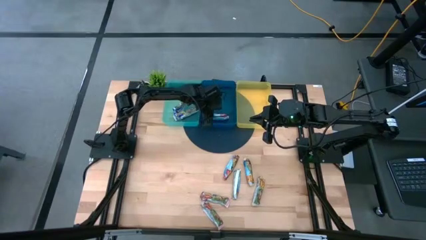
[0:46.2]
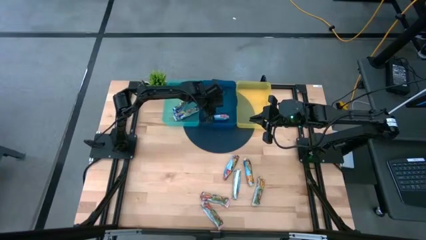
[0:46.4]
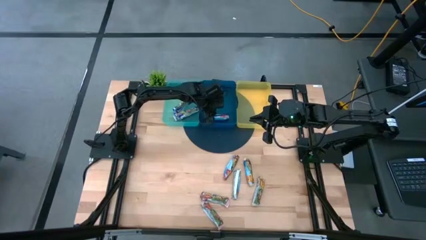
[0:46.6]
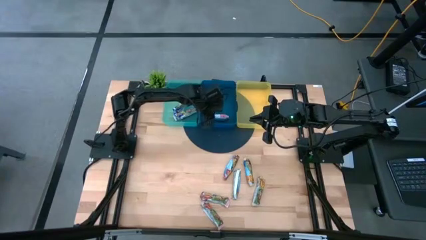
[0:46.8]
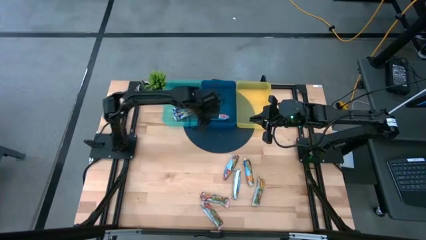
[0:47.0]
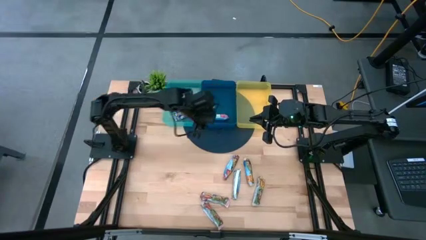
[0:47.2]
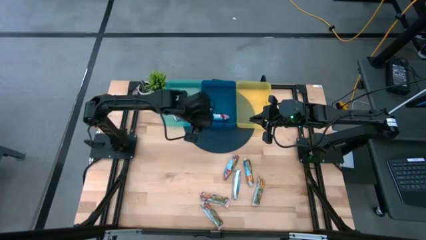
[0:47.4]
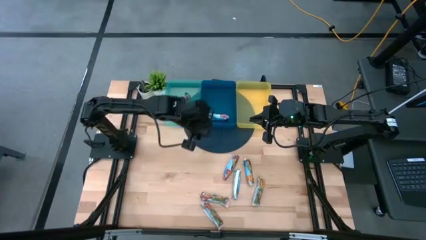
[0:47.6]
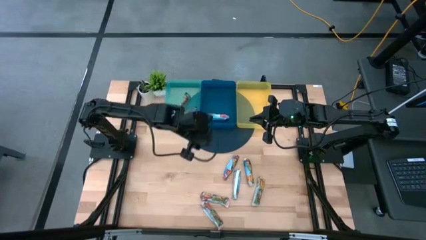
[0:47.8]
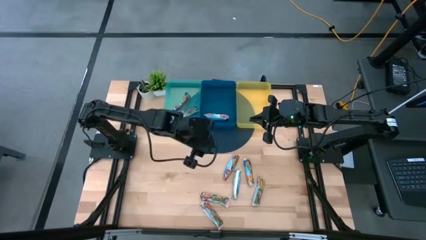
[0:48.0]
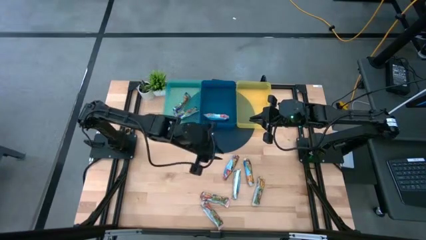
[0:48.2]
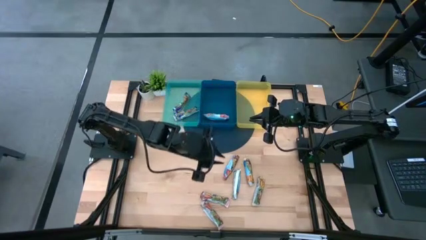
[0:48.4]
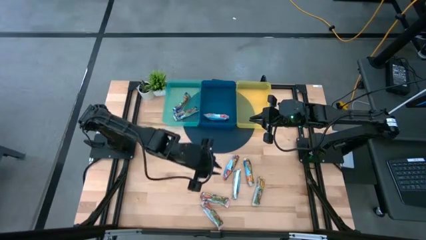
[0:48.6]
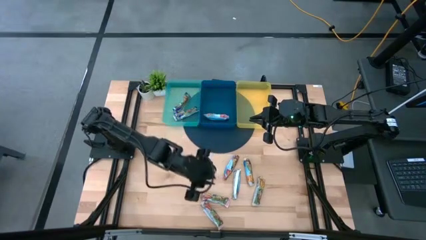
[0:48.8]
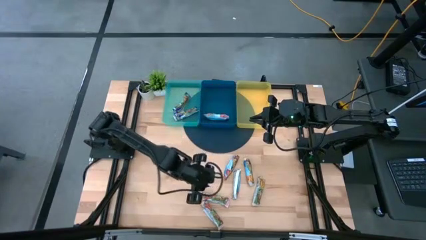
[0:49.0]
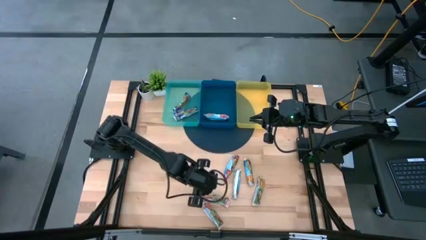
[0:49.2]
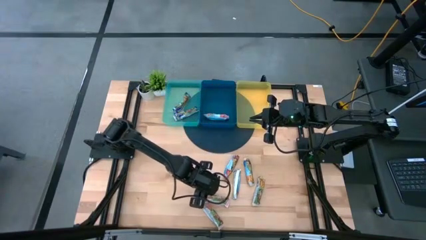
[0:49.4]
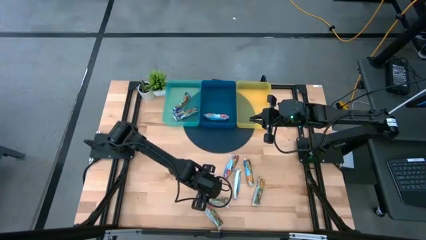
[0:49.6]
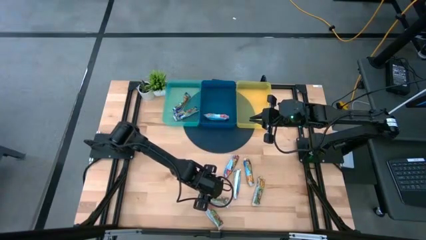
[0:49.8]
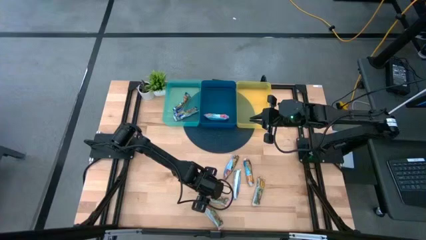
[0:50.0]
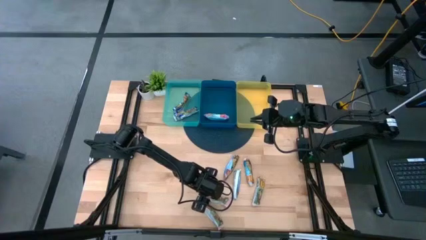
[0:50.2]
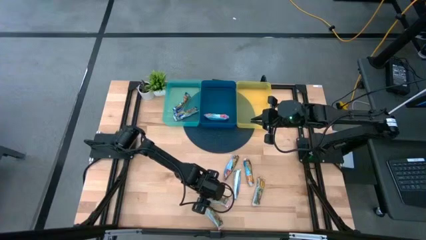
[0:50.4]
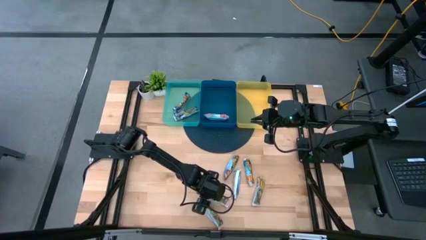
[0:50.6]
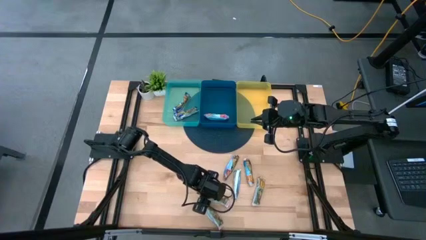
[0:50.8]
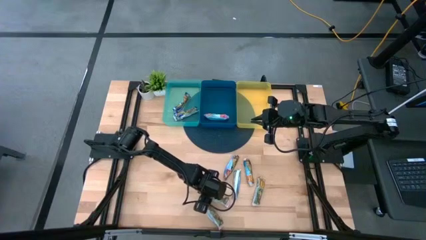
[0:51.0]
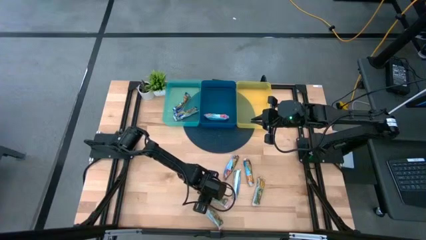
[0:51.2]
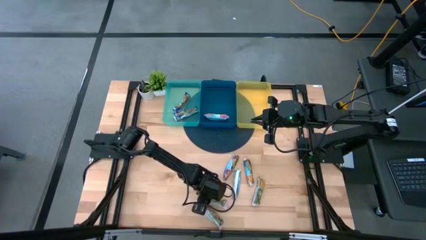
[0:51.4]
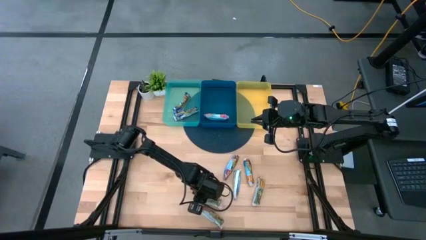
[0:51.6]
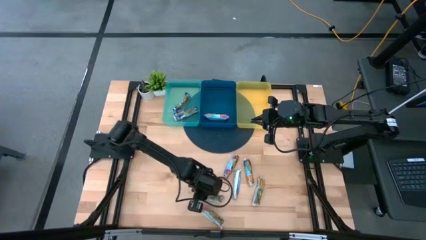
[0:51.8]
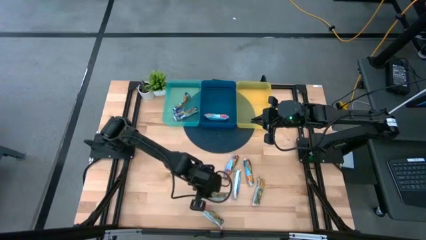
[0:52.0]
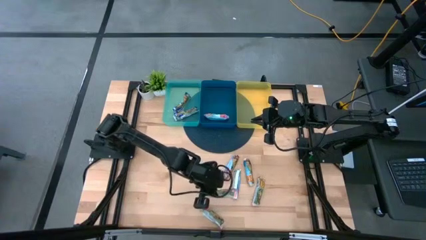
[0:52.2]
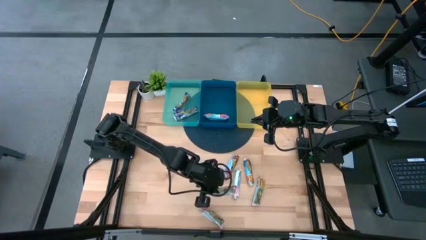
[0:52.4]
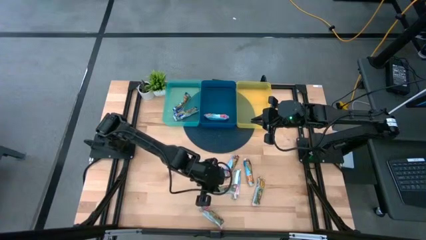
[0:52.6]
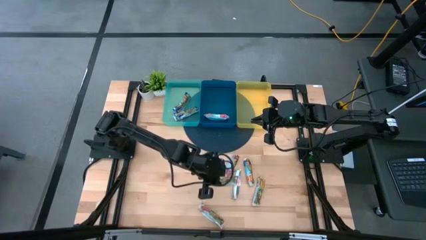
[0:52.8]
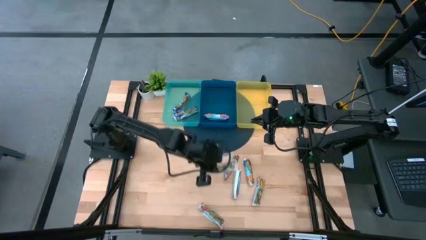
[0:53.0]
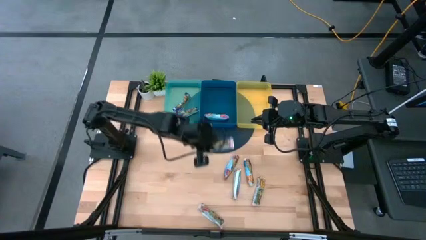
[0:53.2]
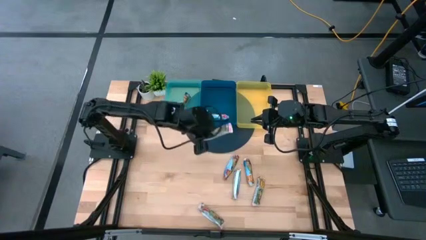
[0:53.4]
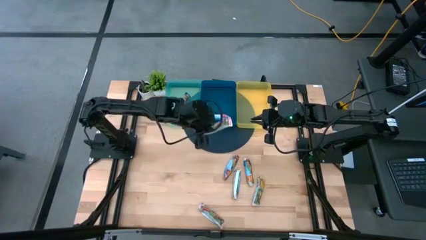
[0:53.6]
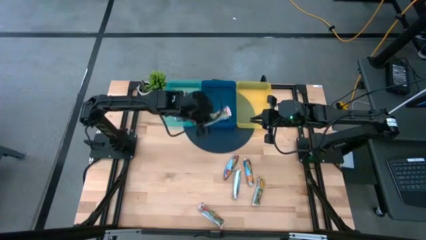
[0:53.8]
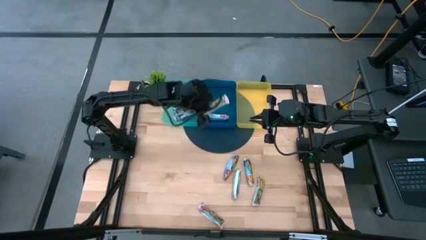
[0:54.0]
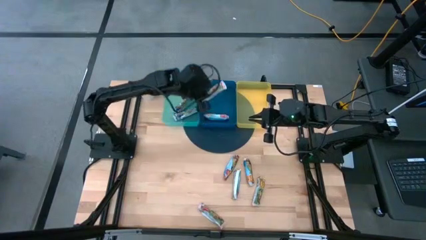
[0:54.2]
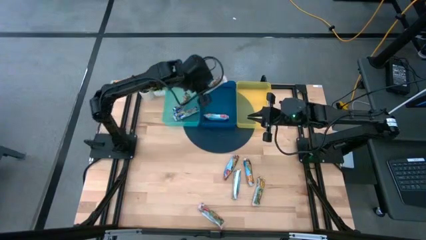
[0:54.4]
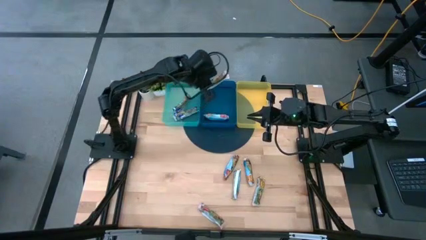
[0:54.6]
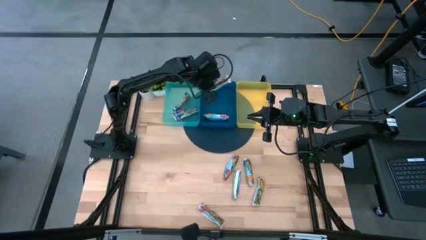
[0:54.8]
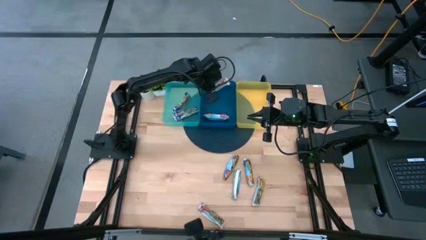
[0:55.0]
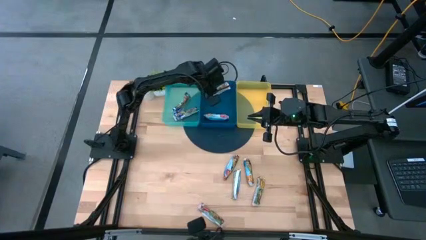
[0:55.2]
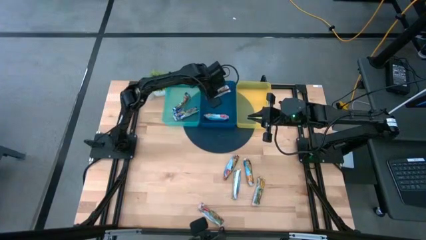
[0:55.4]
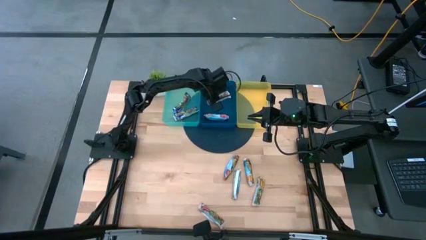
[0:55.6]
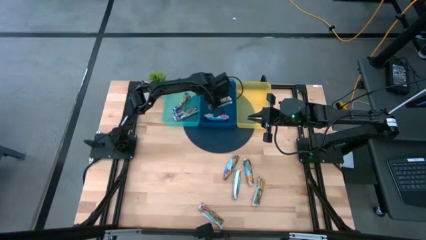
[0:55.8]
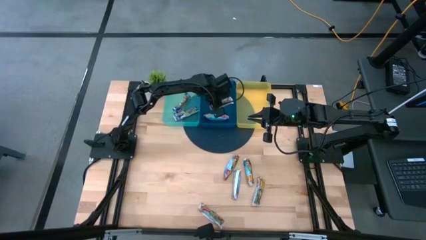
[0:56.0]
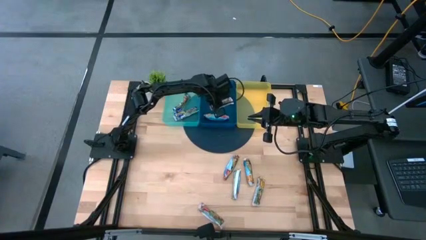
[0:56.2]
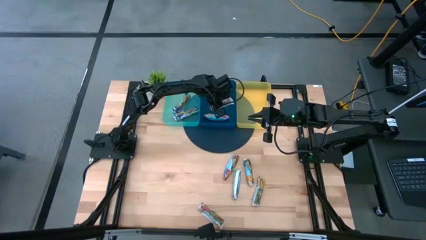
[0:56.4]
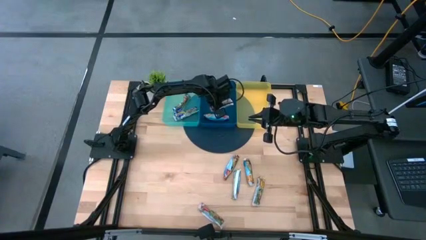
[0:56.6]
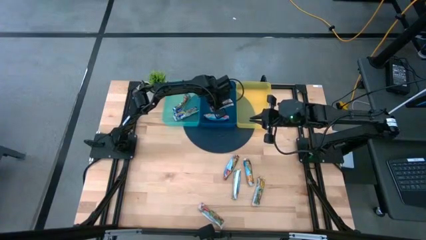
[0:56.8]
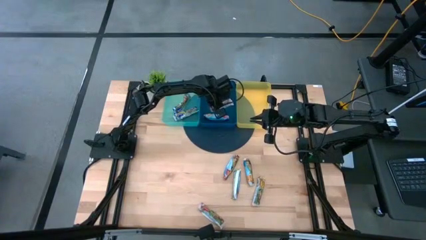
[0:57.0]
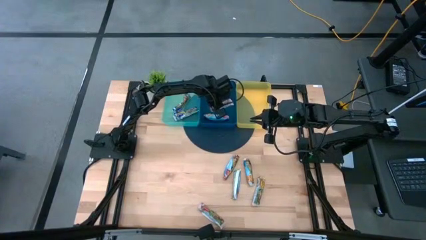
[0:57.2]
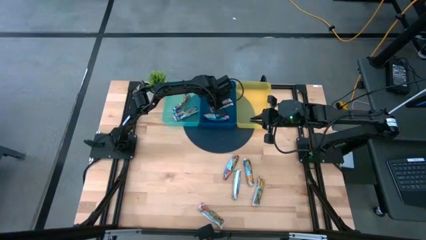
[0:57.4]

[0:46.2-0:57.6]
Task: Pick and place Granola Bars by type
Put the middle red granola bar into the blue bin
